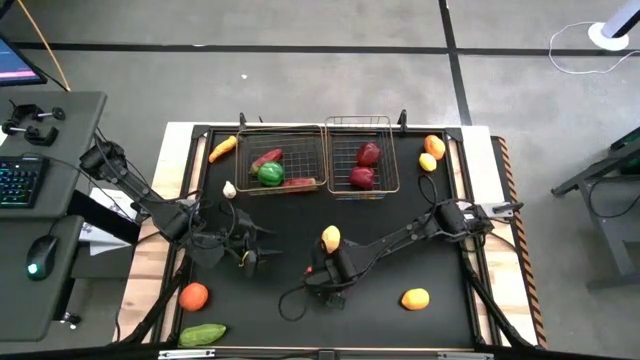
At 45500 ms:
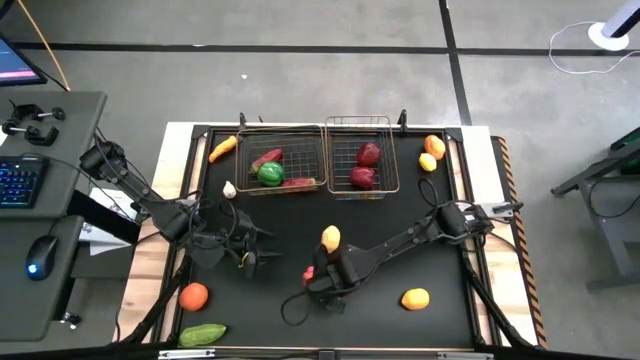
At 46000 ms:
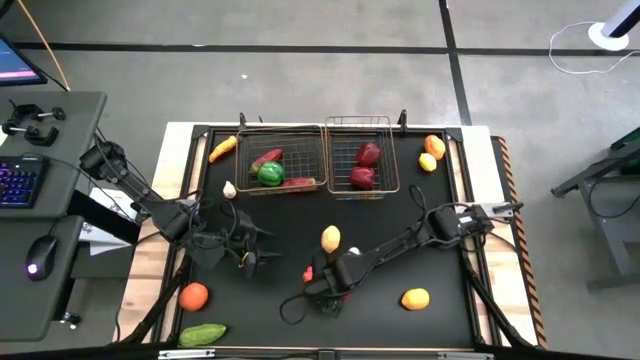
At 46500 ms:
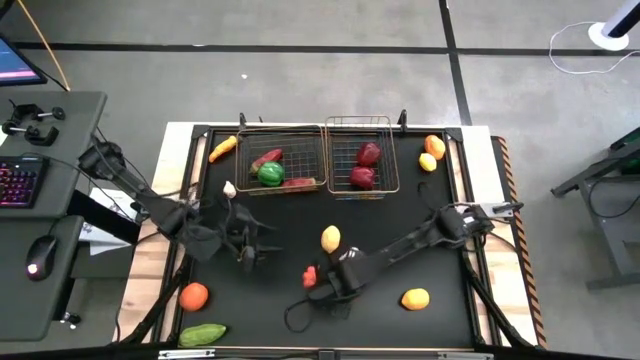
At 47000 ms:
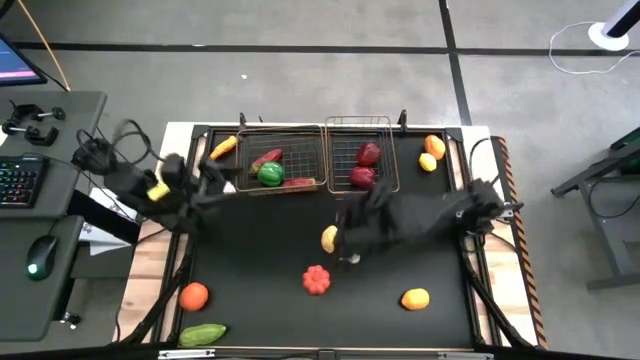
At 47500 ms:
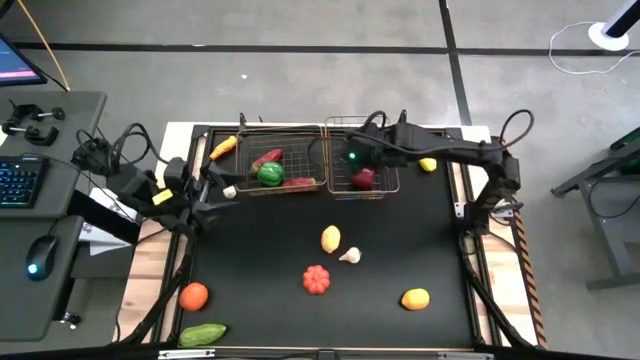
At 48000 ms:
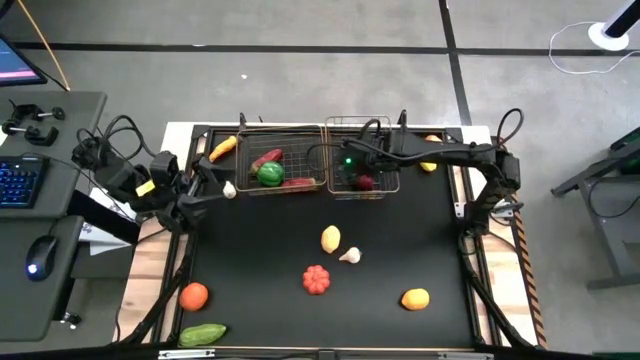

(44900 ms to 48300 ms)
Task: Sort produce into baskets
Put the tomato into the right gold wire basket

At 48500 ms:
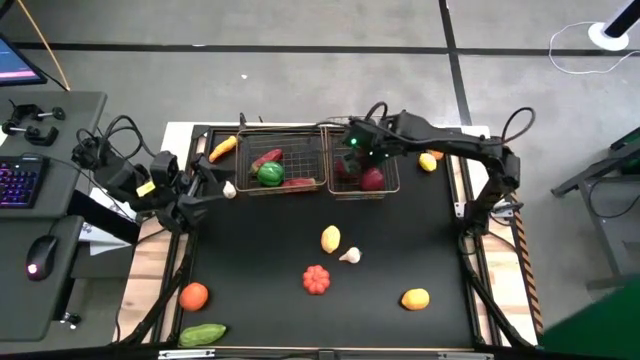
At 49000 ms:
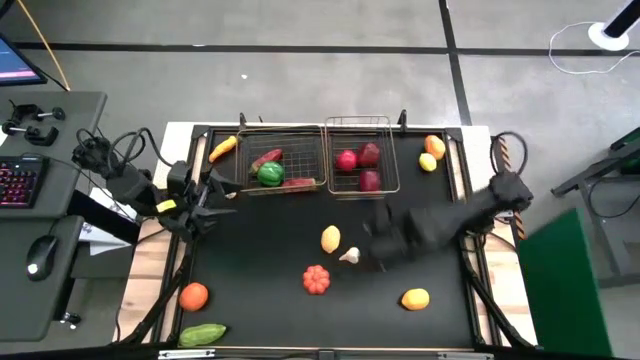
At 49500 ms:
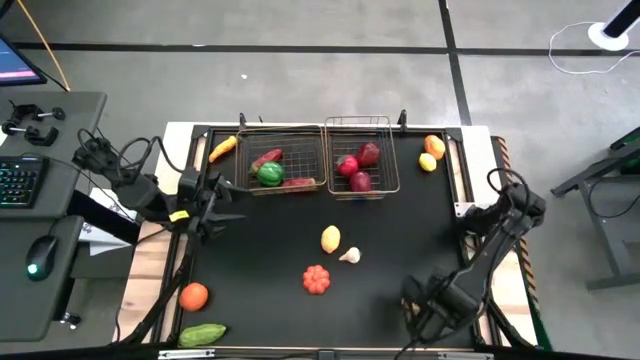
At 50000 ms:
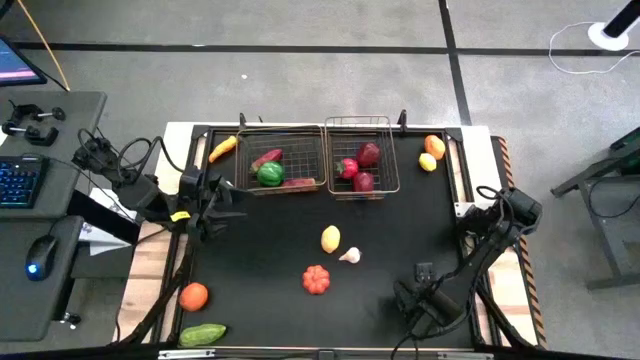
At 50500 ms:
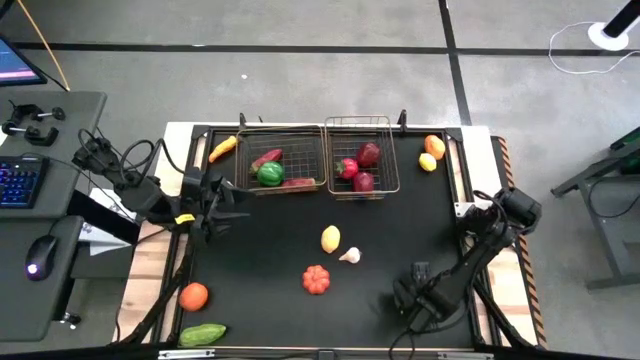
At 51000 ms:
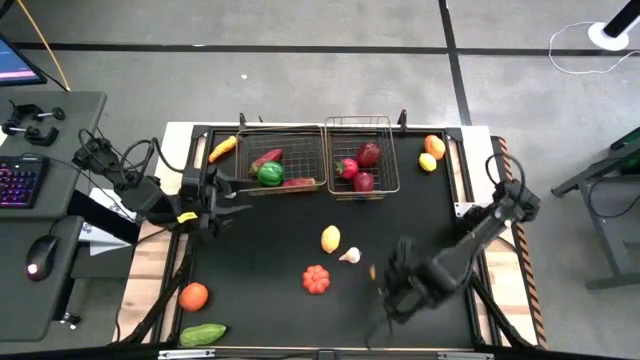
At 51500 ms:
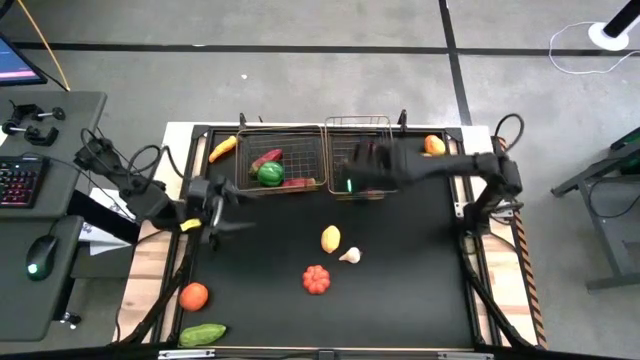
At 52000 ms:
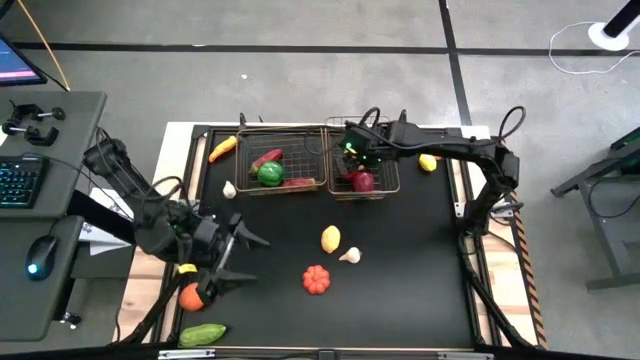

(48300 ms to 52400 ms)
Put the bottom yellow lemon into the right wire basket

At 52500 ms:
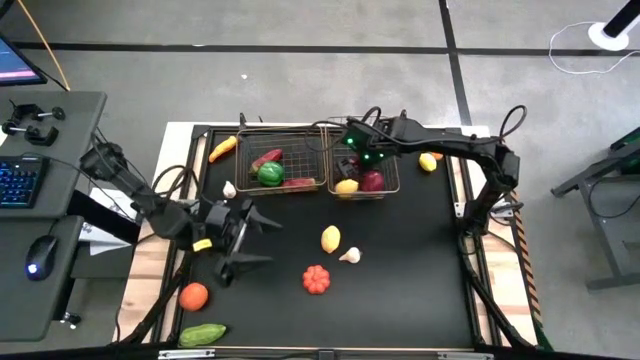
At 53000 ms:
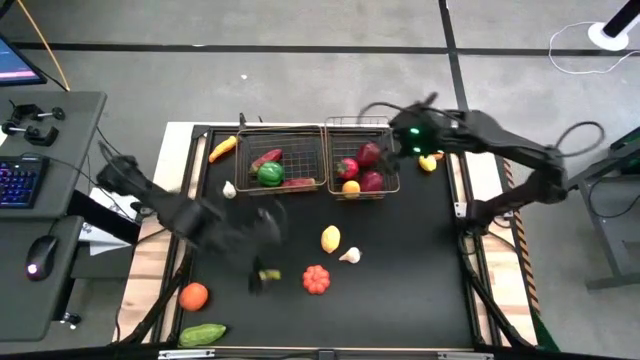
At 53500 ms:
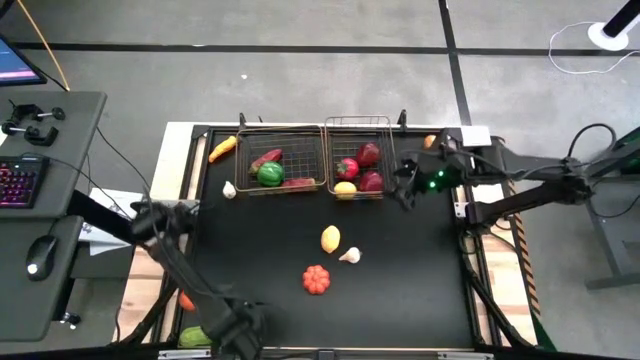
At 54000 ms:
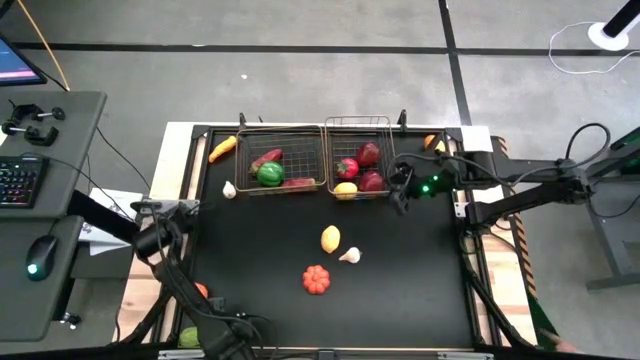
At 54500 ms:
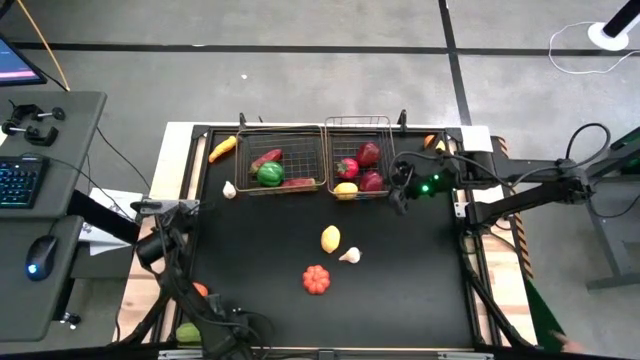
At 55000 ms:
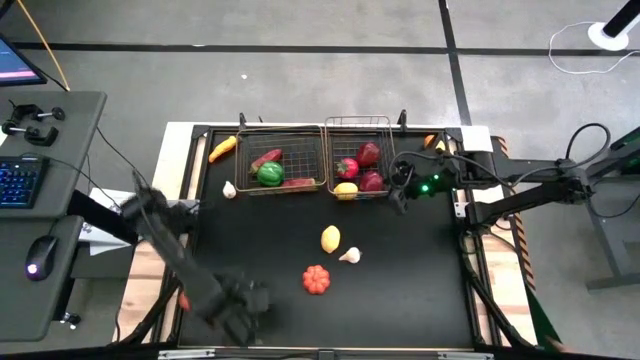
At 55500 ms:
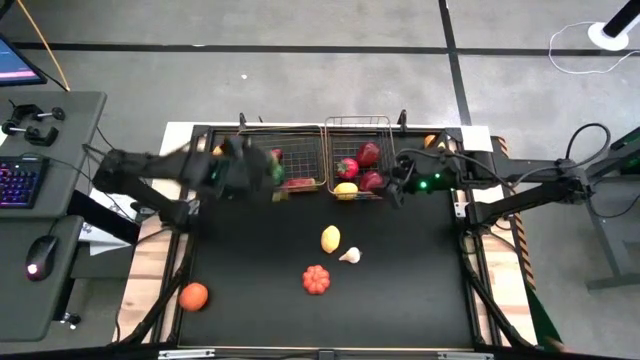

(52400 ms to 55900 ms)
Put the green cucumber into the left wire basket

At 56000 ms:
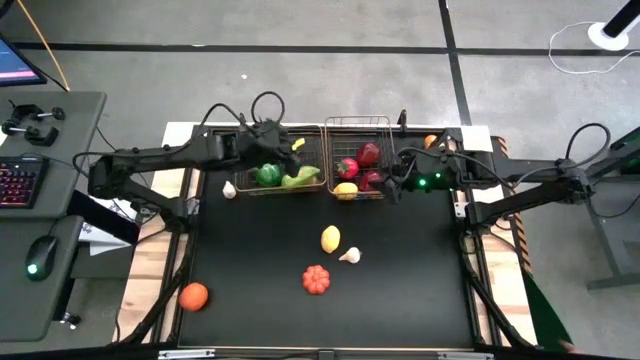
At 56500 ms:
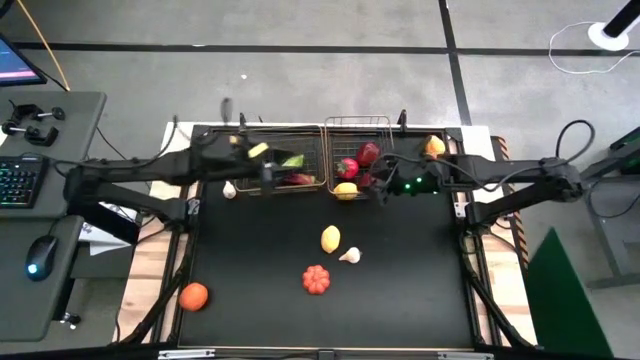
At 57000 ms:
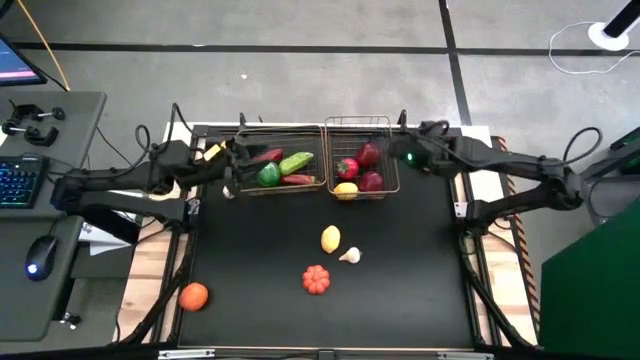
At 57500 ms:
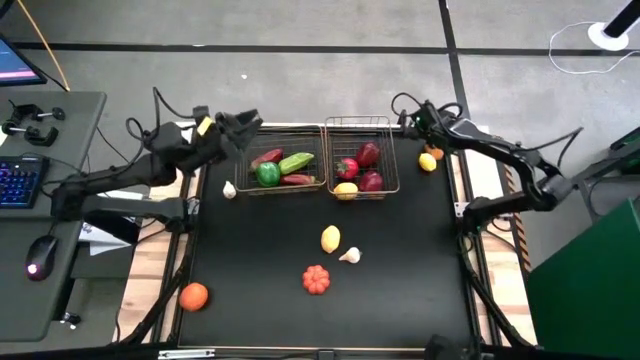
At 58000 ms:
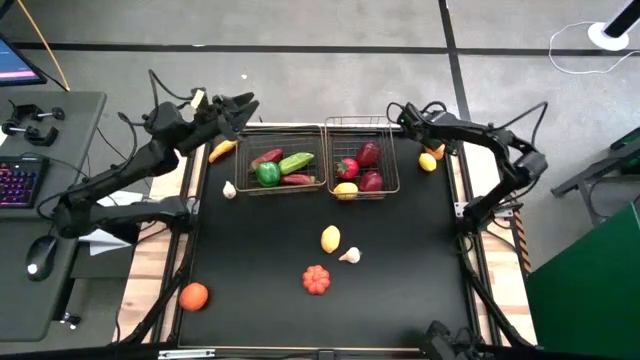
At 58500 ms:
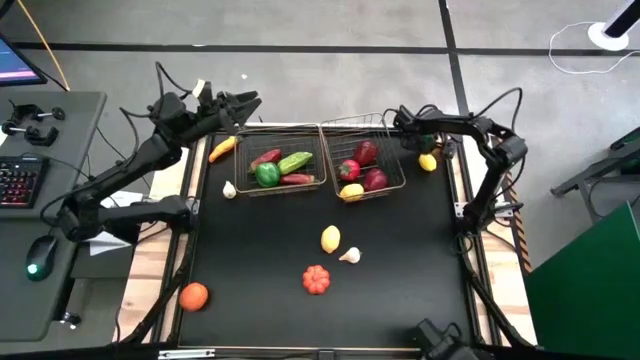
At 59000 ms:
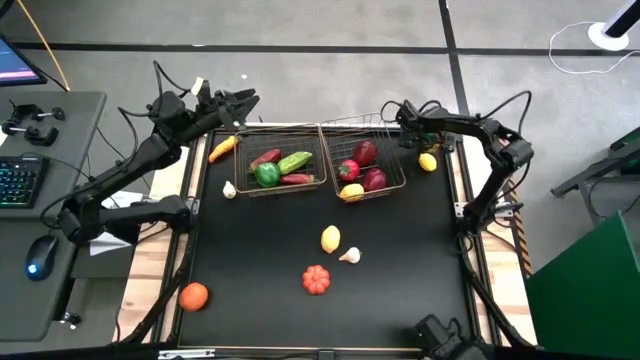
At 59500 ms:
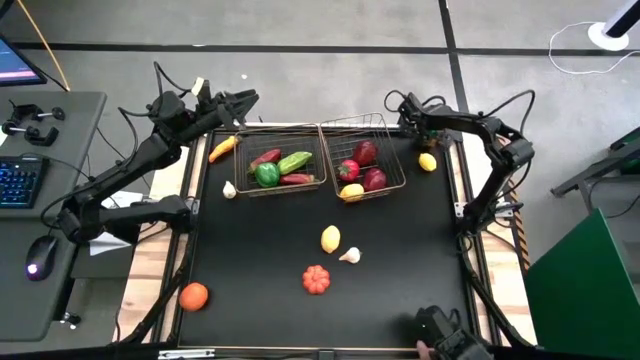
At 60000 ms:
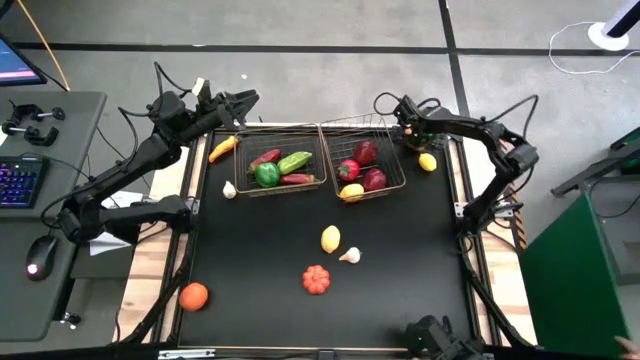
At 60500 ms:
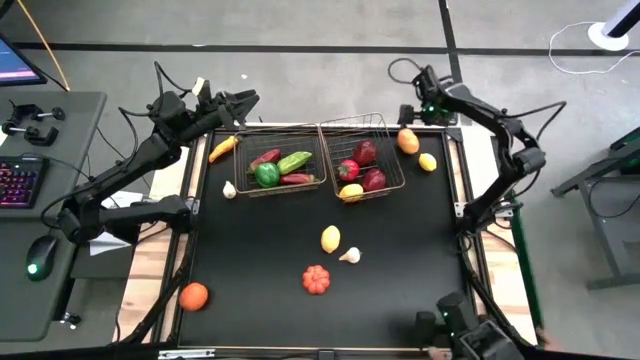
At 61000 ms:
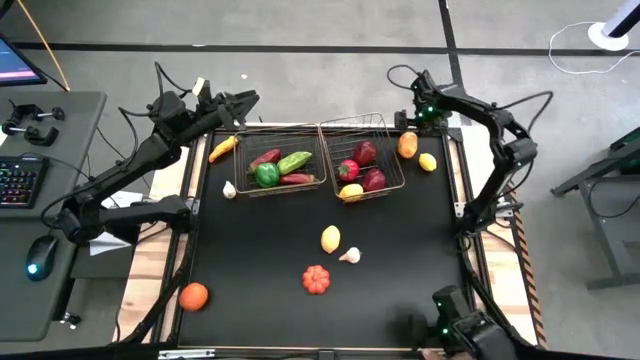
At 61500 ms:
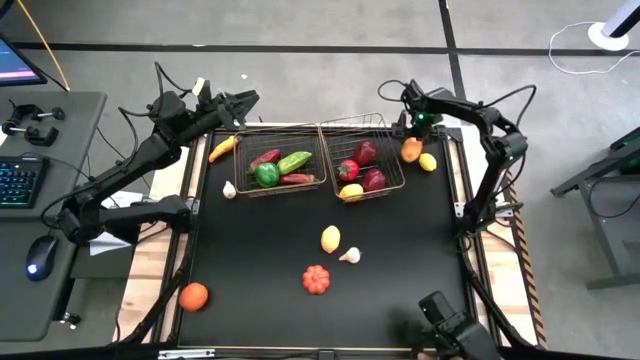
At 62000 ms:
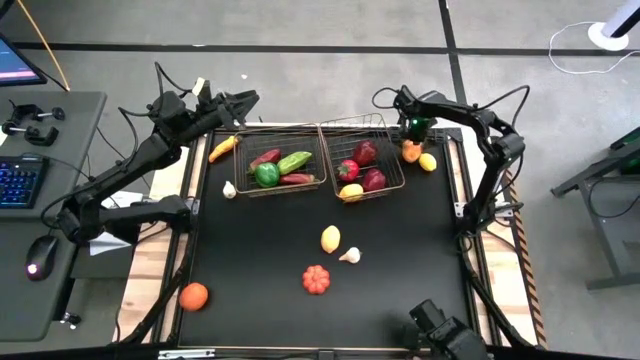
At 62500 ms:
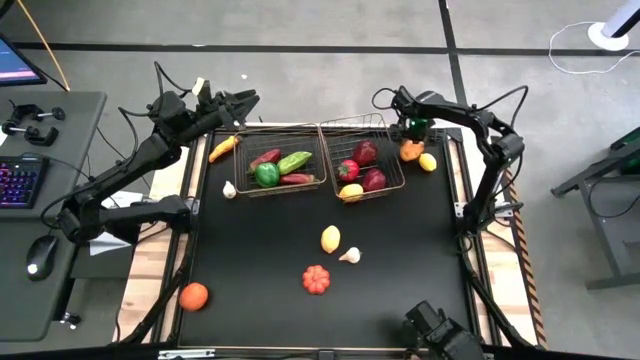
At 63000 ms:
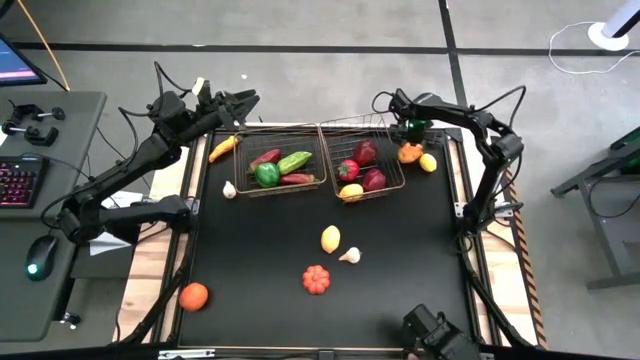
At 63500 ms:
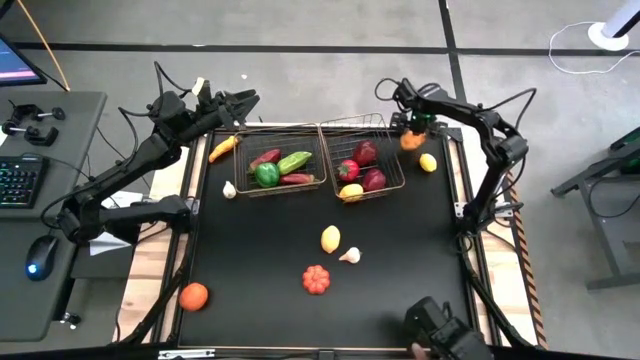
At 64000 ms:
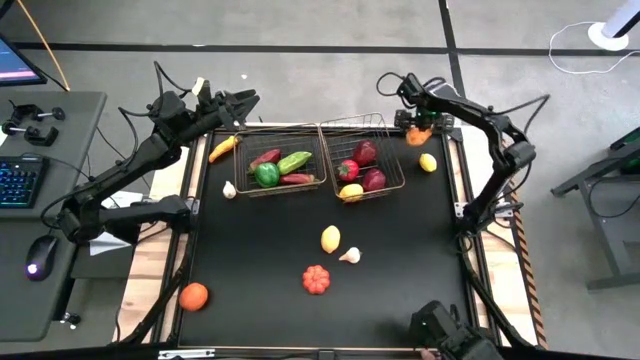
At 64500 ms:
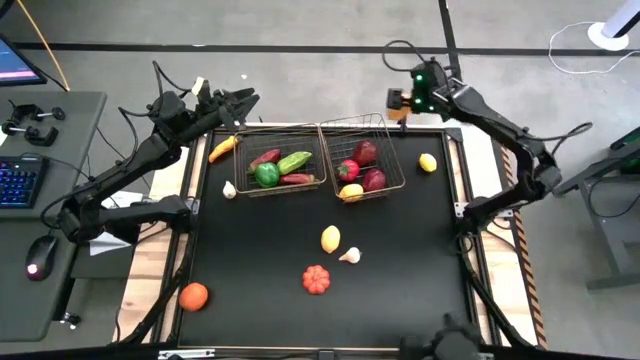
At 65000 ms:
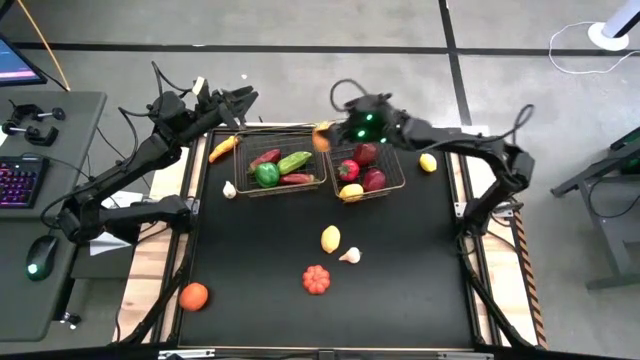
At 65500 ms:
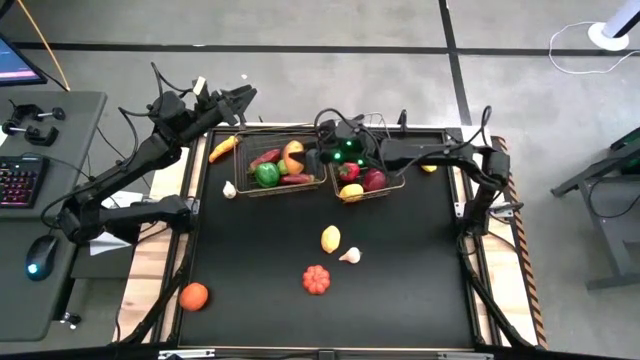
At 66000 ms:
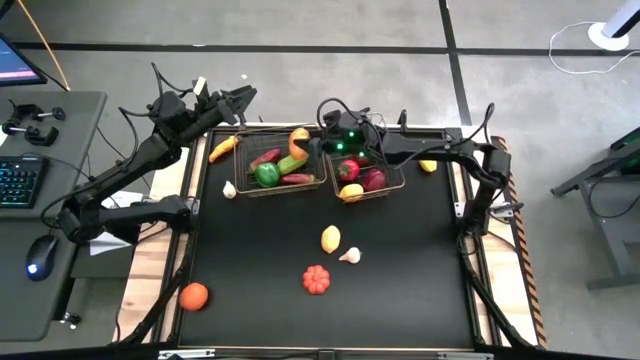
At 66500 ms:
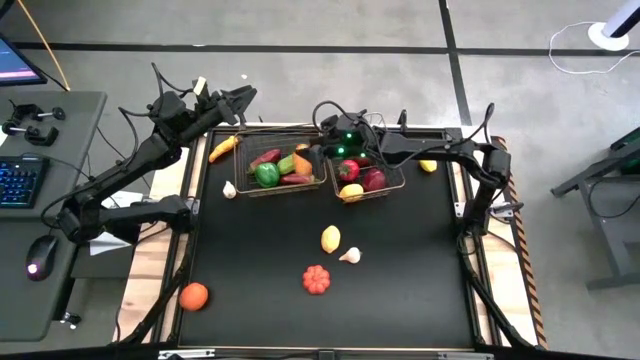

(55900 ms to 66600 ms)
Put the yellow potato into the left wire basket
